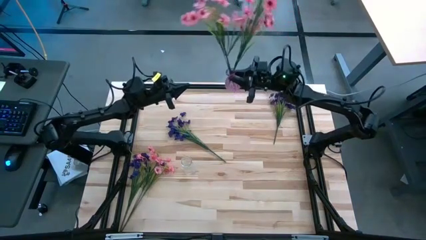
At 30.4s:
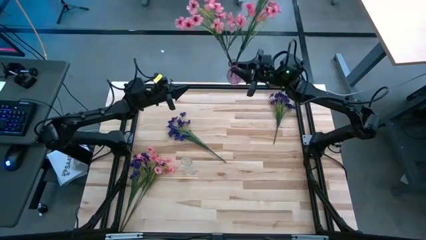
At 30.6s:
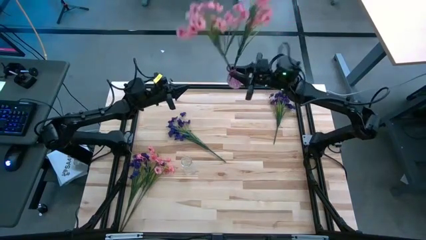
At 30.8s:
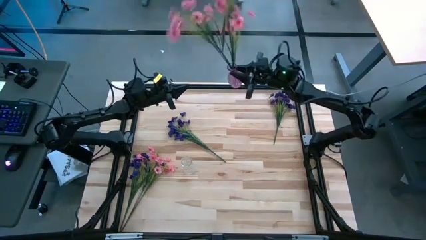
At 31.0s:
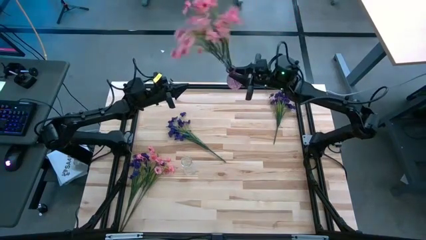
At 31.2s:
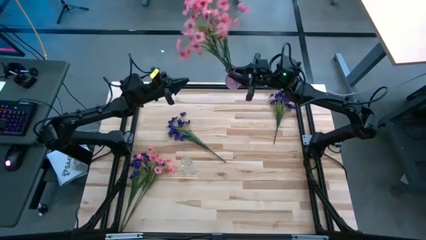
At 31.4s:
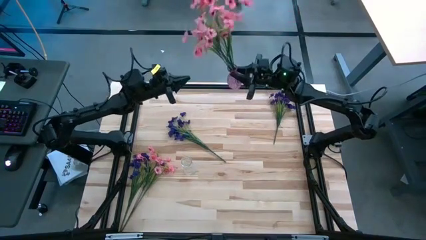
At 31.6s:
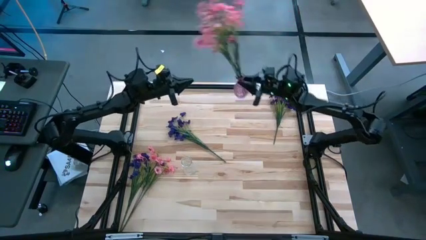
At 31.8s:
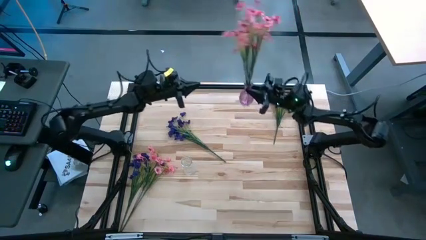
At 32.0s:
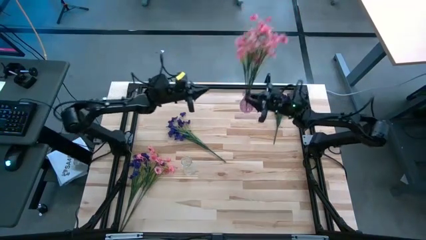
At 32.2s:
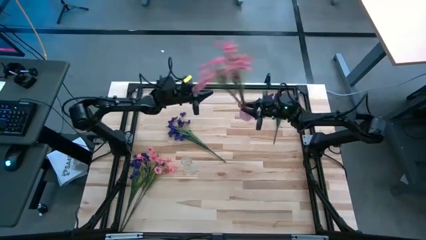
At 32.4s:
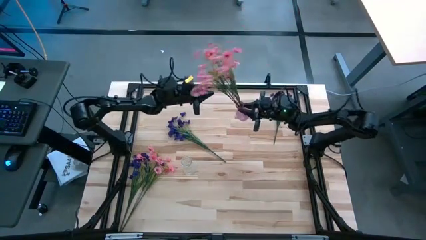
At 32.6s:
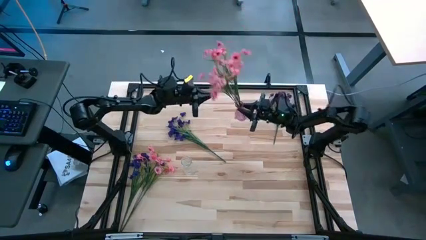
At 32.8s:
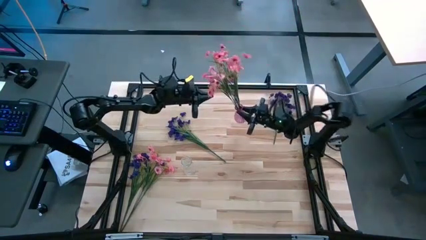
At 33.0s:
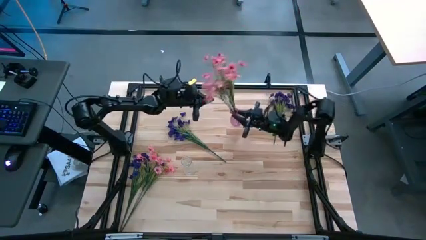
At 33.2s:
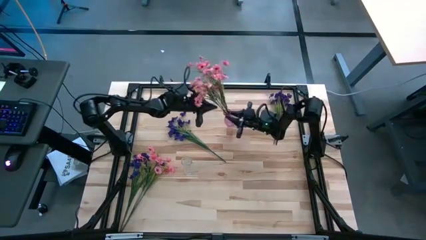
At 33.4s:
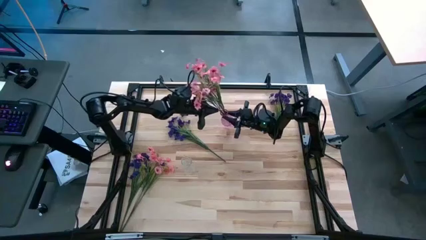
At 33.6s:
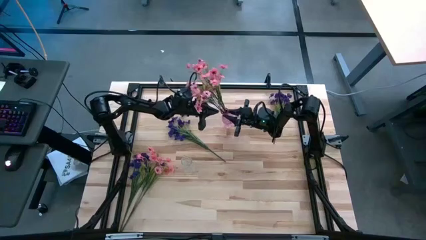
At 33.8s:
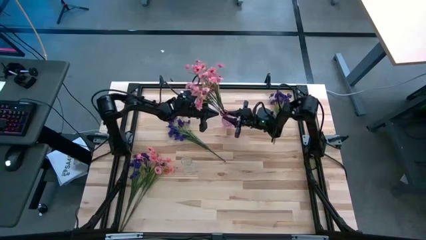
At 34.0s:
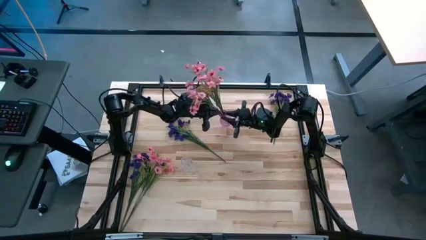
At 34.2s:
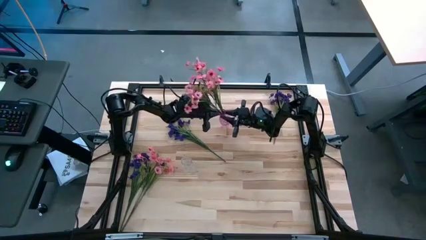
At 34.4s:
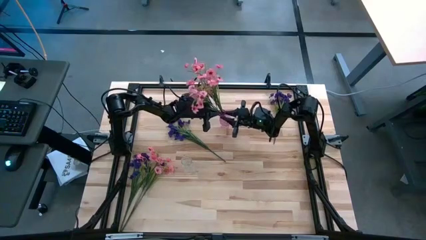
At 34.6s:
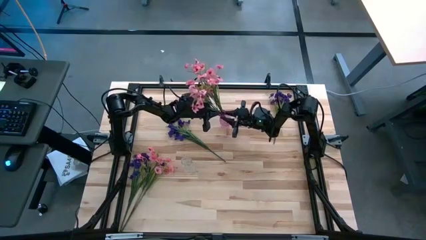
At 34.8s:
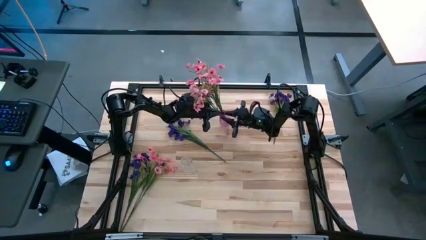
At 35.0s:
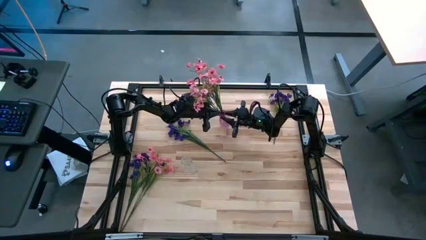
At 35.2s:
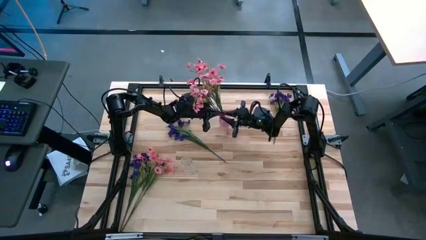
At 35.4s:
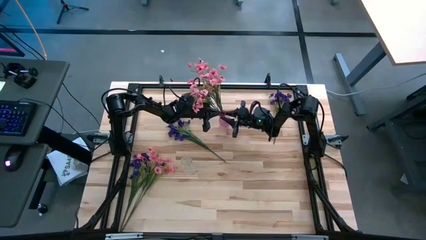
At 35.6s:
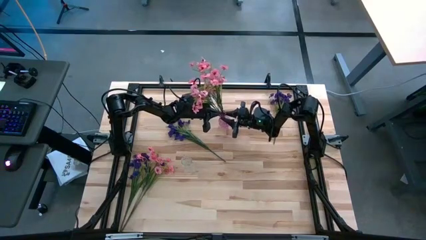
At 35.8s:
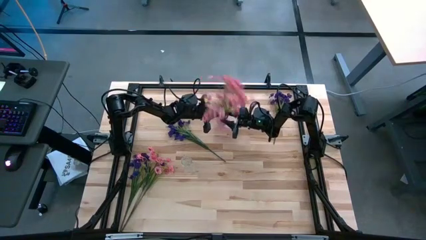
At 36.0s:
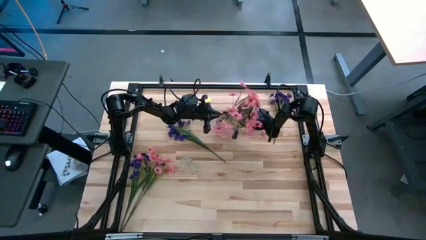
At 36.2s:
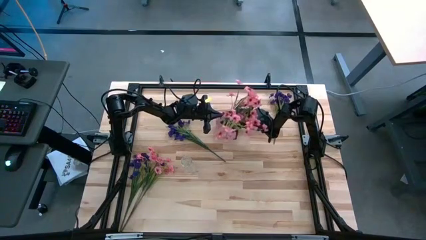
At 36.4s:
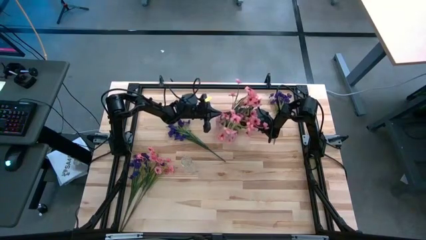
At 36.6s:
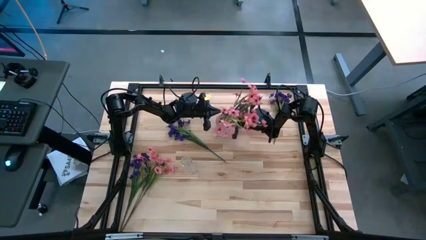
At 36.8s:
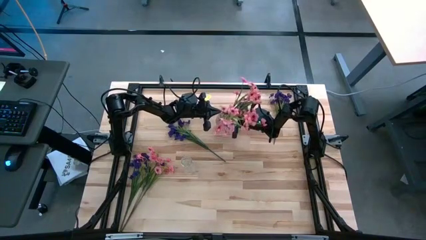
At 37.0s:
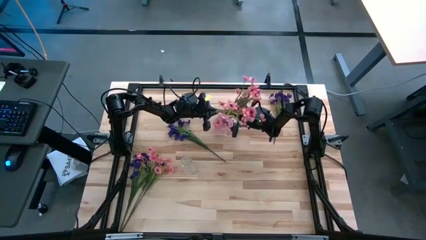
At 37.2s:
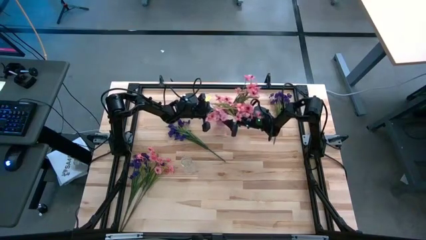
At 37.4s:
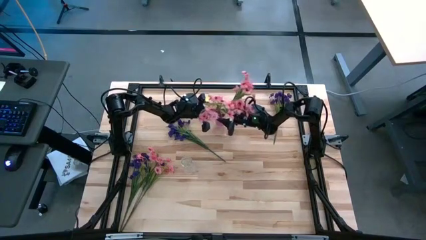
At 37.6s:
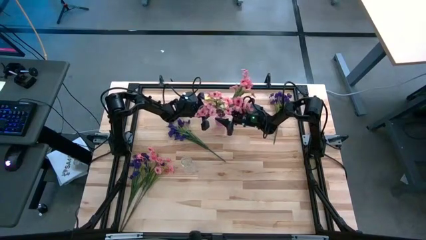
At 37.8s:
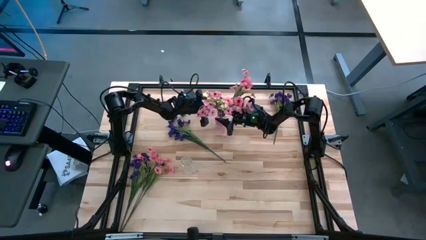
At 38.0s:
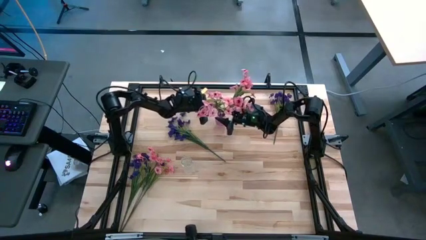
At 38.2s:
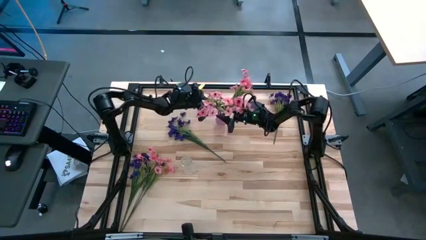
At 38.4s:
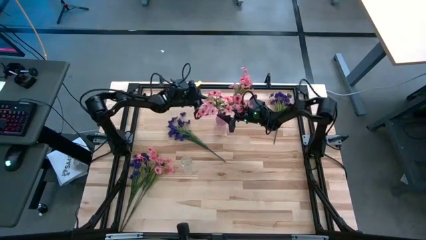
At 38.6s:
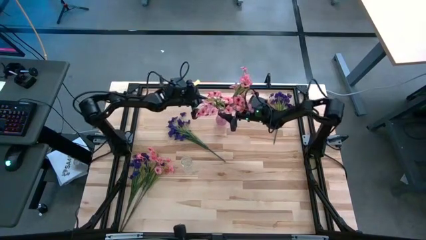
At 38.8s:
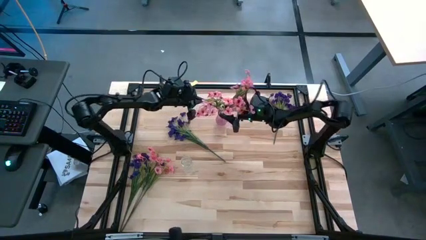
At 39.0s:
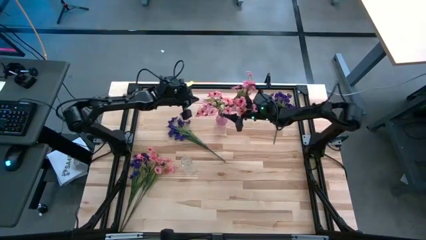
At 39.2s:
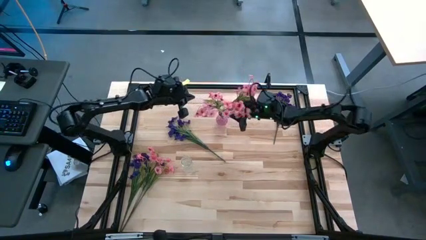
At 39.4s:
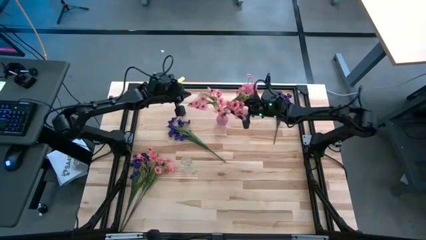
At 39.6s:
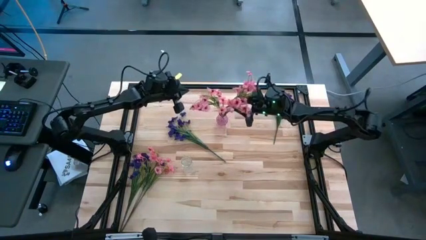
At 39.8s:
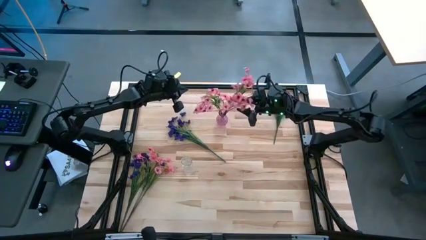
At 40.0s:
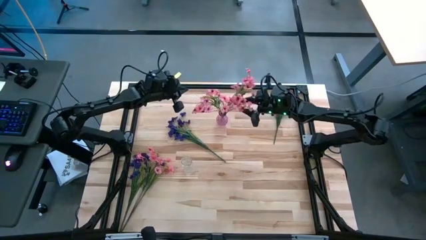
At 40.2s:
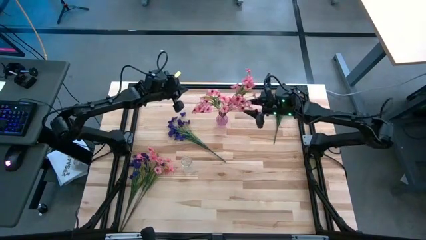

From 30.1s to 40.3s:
Task: Sort flowers into vase by color
Adjust the purple vase on the table

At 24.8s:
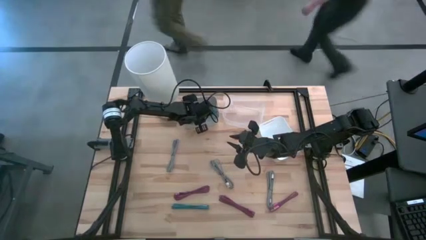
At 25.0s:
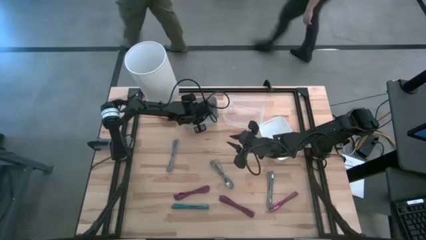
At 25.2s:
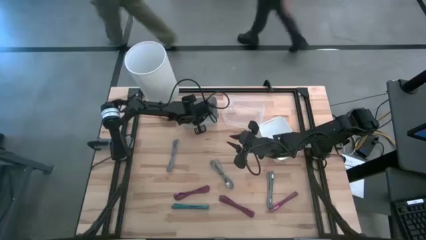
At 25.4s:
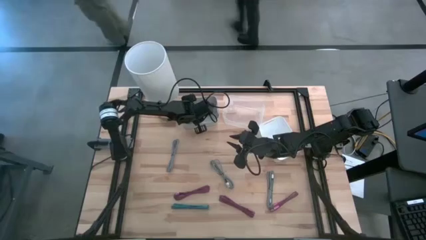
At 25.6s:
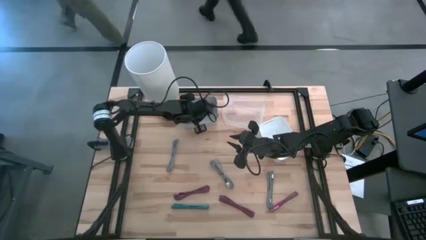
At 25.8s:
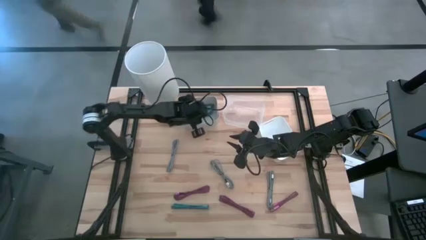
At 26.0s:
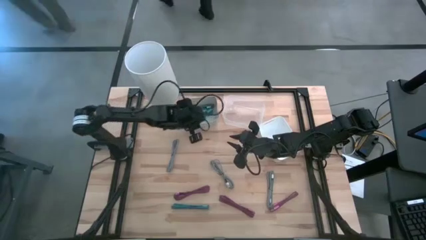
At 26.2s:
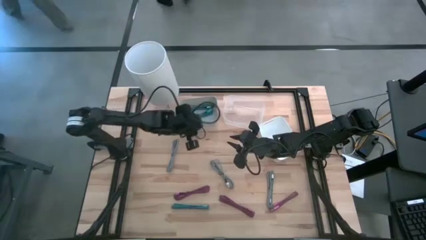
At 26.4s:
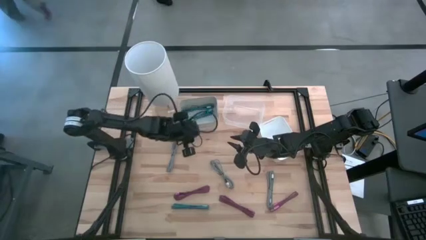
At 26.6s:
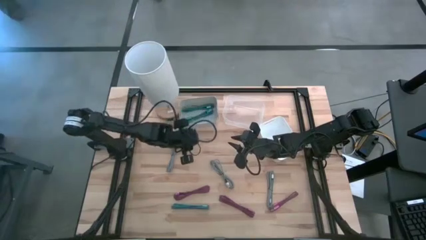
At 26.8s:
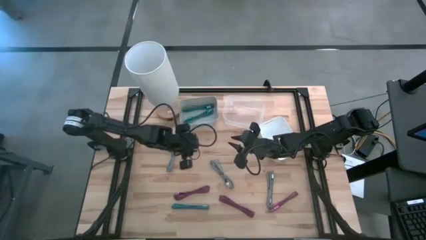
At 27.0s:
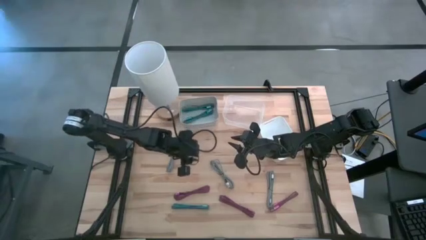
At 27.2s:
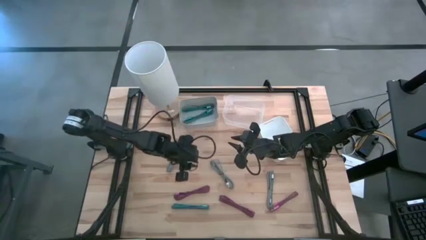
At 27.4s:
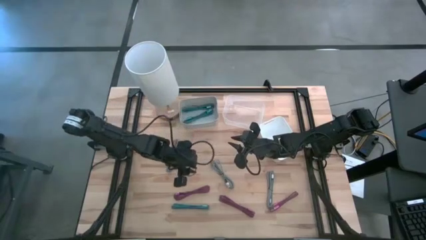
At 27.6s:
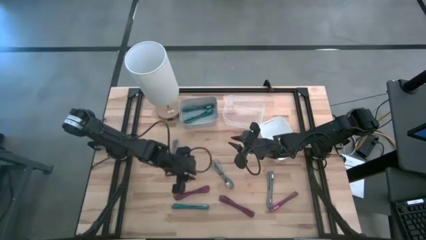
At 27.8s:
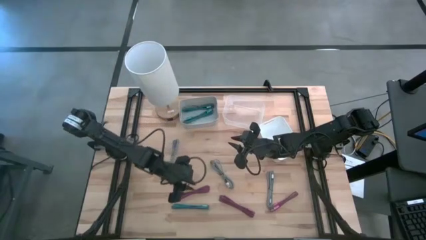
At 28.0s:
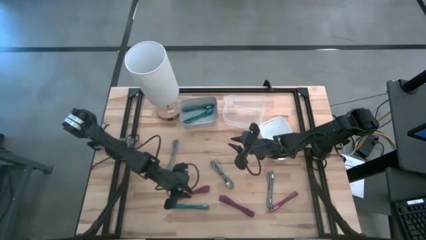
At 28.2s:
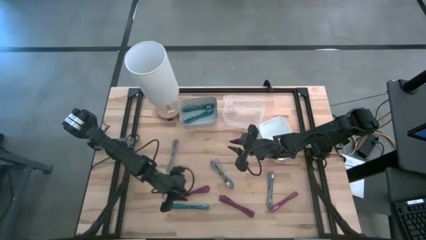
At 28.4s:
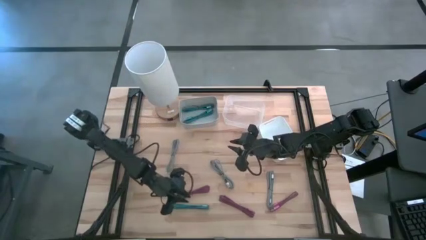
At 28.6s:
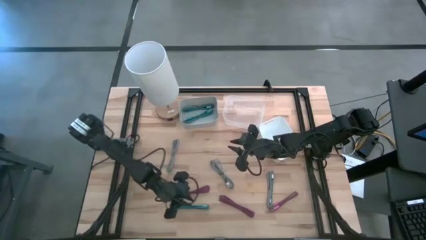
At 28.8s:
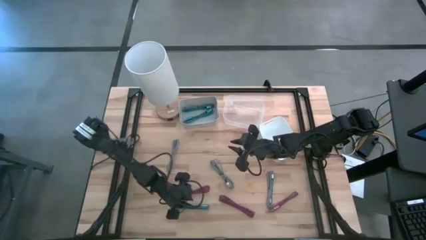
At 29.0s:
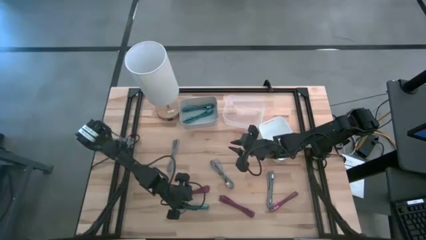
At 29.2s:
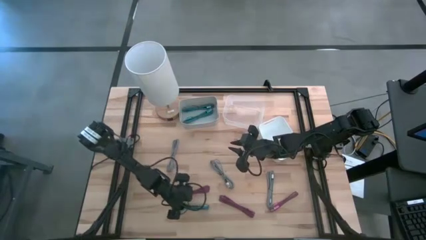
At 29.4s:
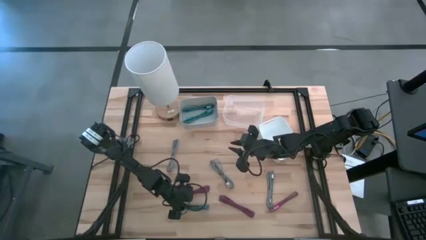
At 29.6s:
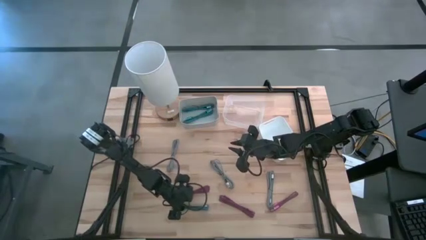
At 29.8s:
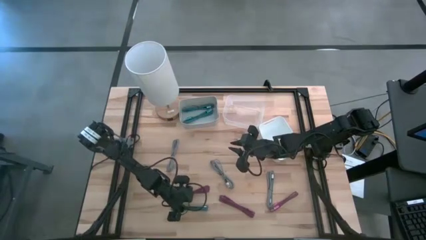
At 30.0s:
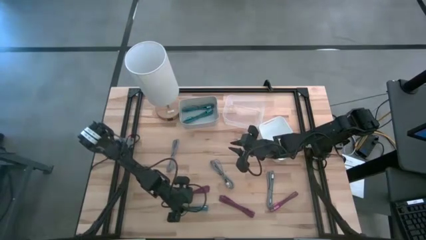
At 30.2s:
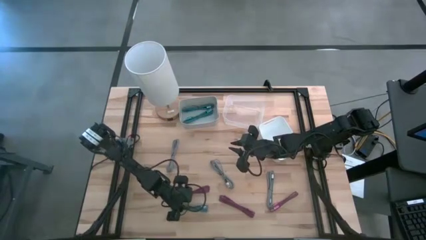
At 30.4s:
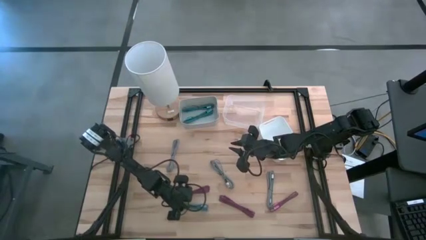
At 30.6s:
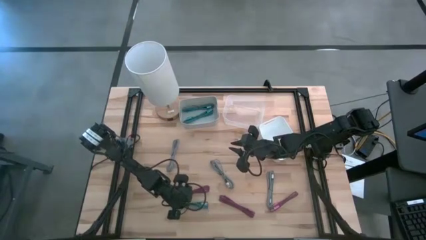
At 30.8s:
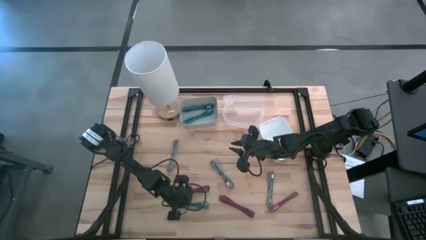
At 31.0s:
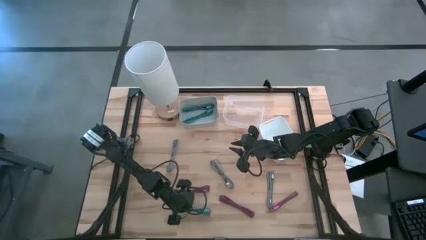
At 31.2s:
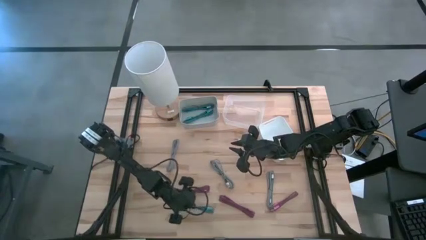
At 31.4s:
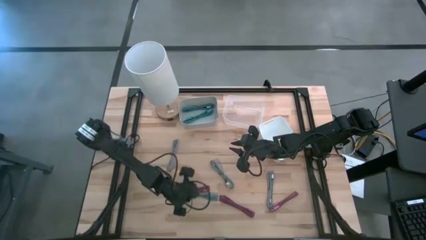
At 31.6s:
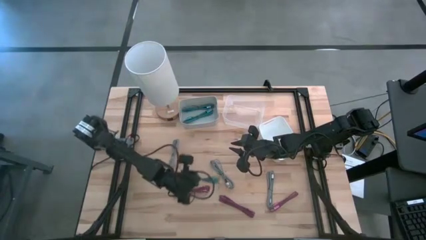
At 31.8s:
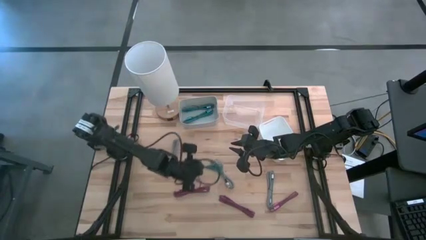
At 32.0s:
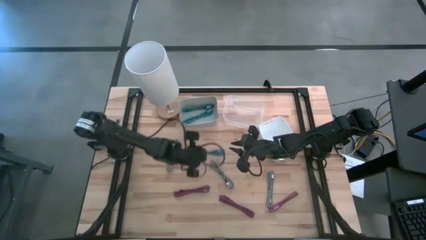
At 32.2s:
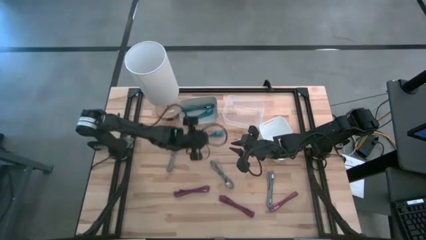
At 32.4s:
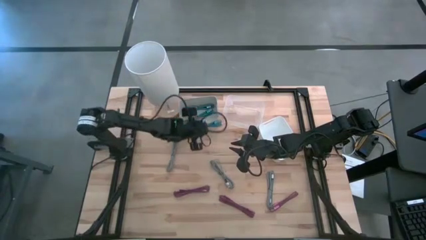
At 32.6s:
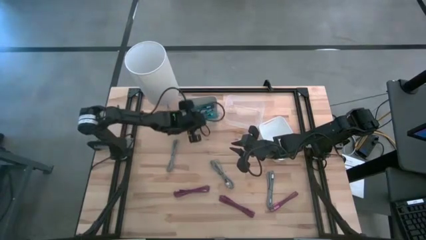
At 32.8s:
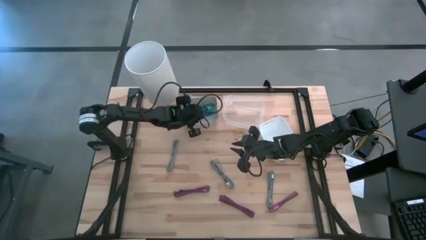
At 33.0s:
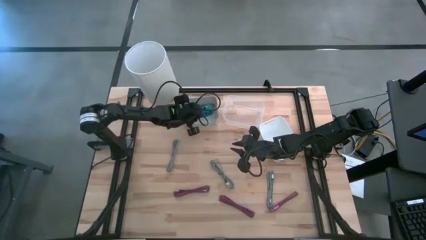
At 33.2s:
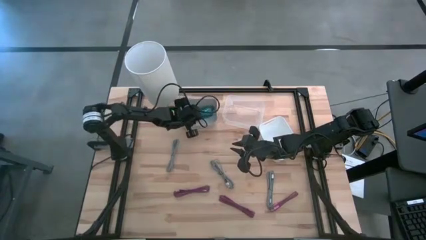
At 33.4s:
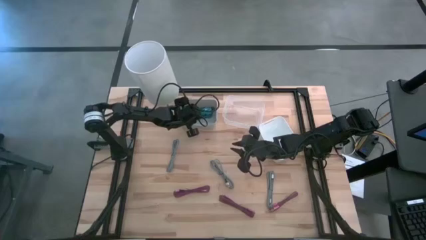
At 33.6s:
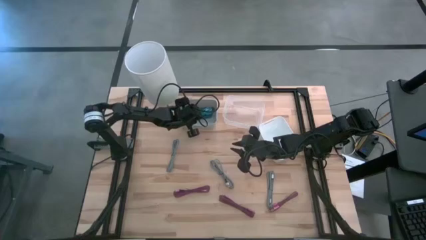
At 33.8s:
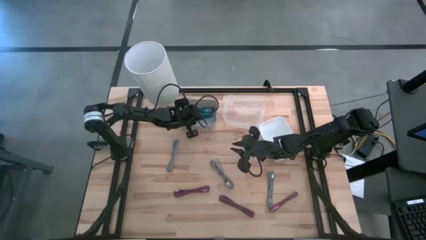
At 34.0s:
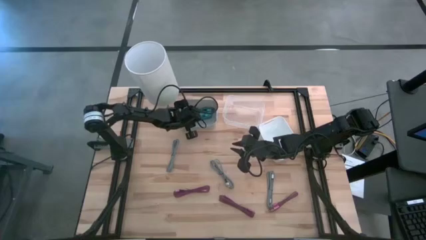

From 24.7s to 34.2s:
Task: Pick & Place USB Port
Put the blue USB cable into the gray bin
